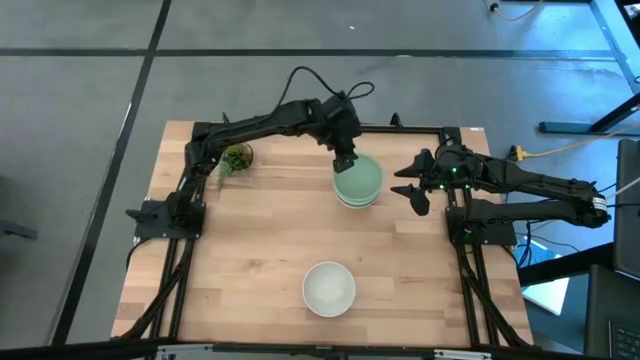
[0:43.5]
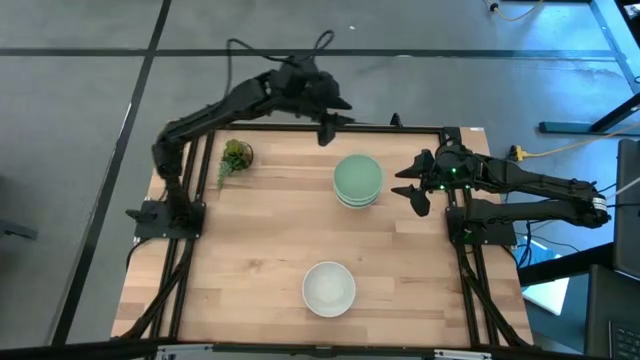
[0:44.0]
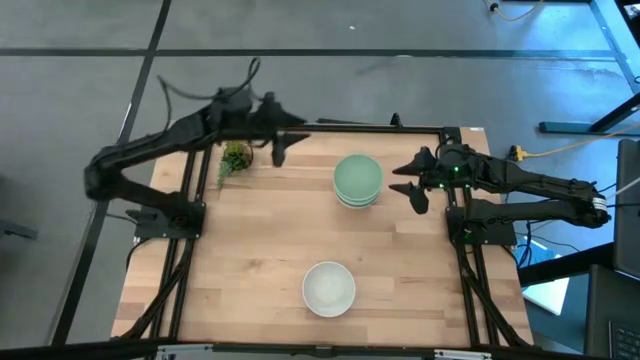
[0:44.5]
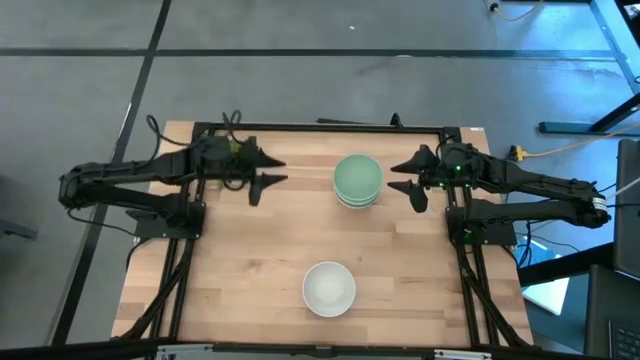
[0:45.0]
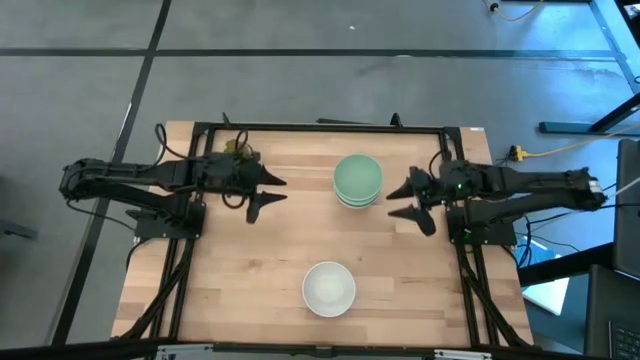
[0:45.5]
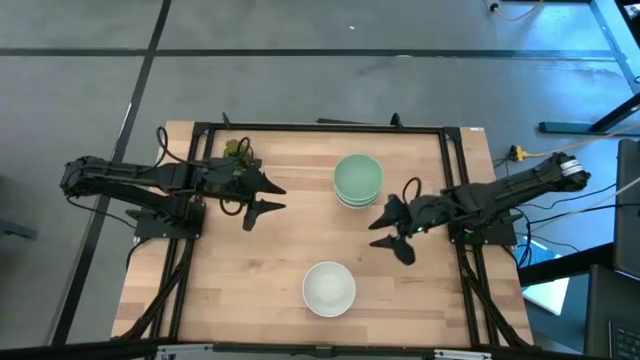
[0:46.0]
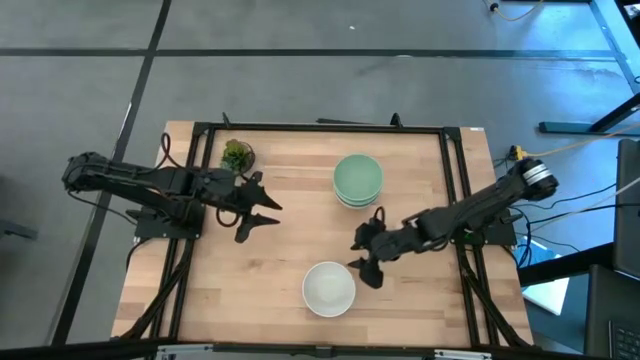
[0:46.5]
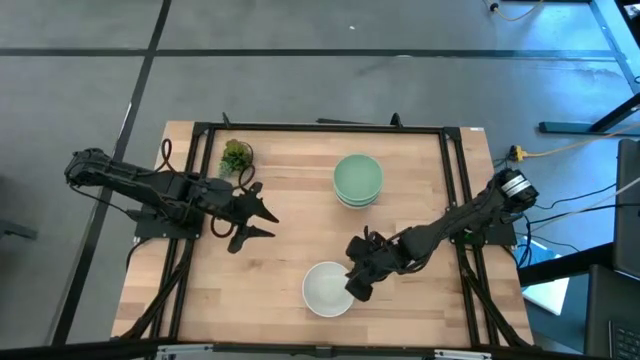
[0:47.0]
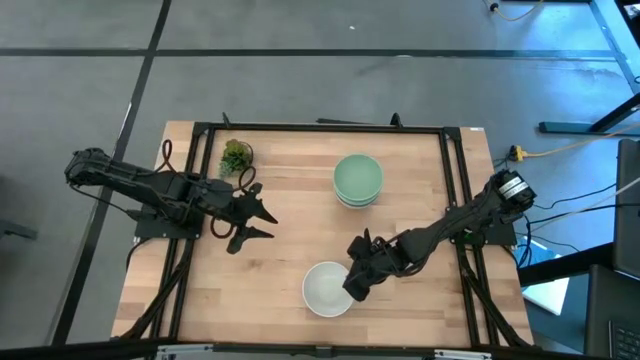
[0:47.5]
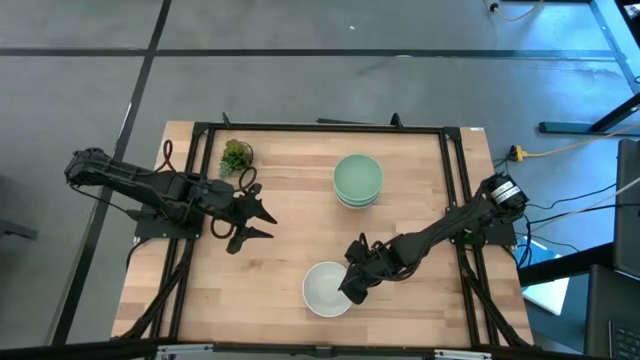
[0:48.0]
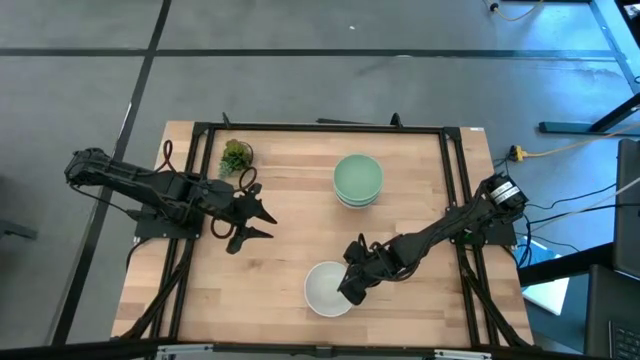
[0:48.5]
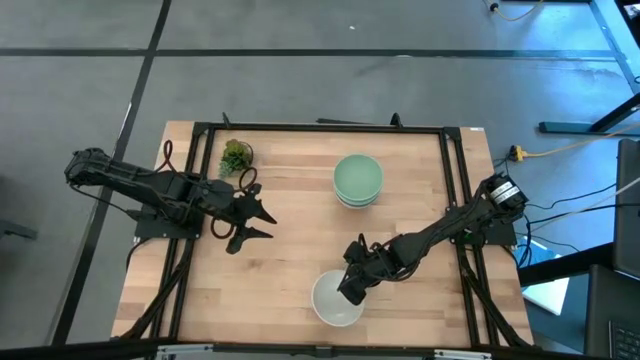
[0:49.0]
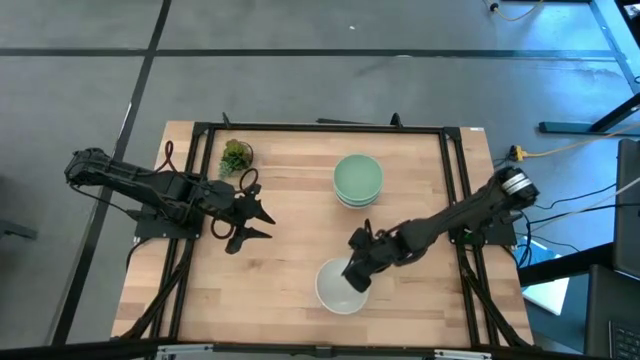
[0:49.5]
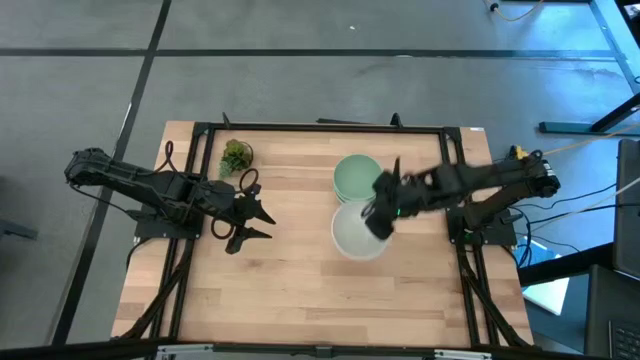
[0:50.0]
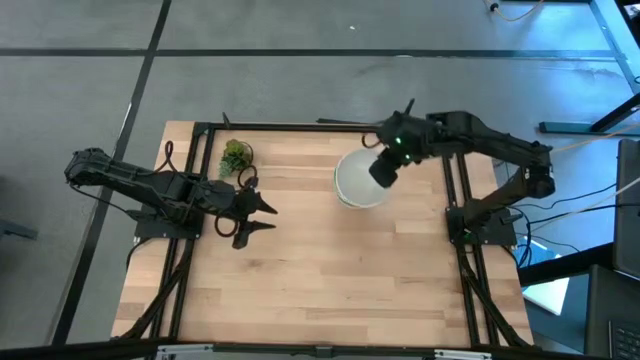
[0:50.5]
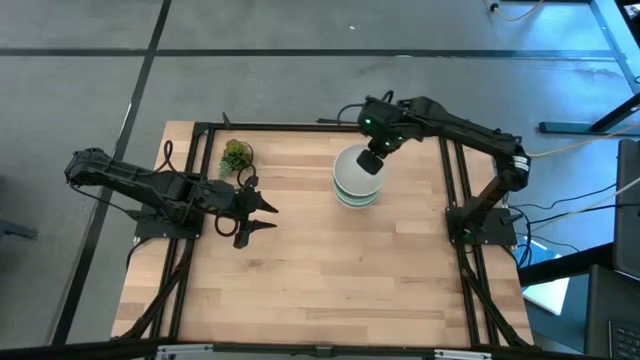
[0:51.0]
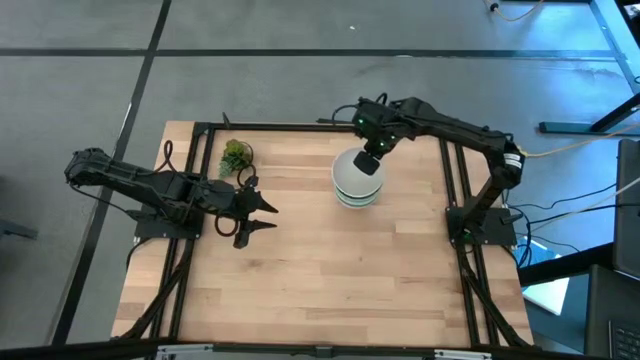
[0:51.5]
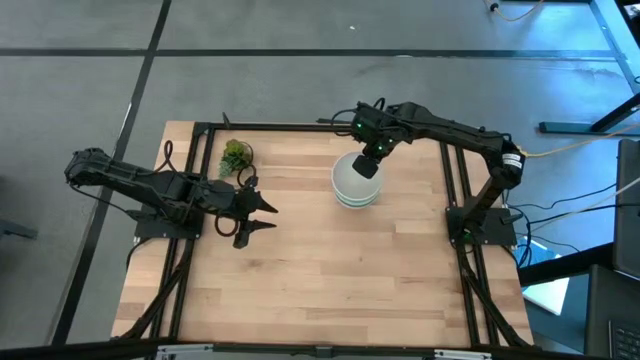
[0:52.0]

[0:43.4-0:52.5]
Task: Nest bowls inside each other
Stack the white bowl on top of the light green bowl

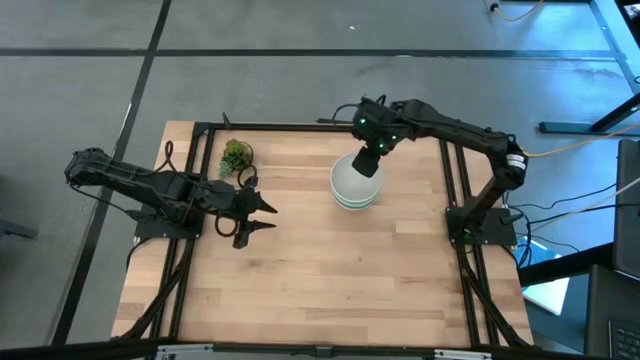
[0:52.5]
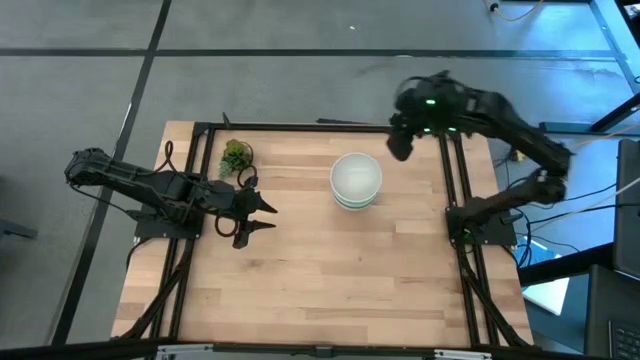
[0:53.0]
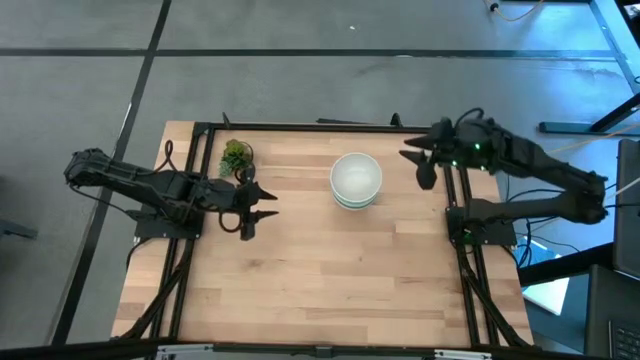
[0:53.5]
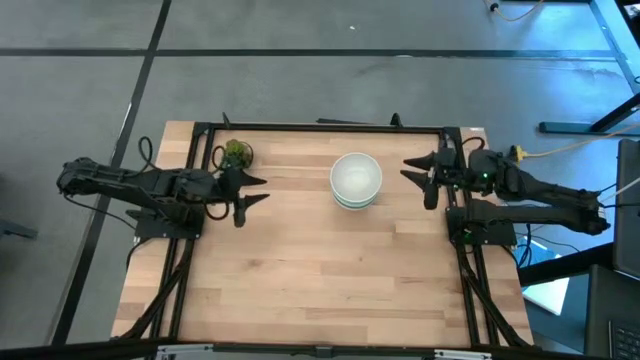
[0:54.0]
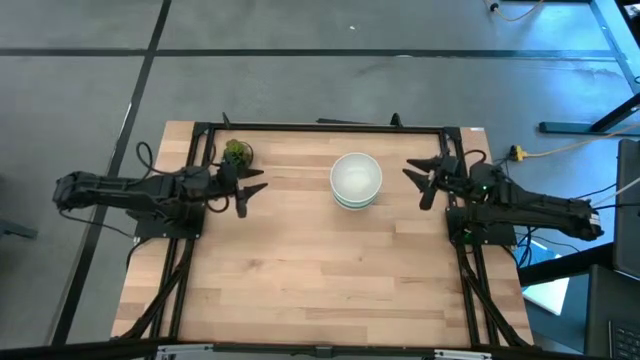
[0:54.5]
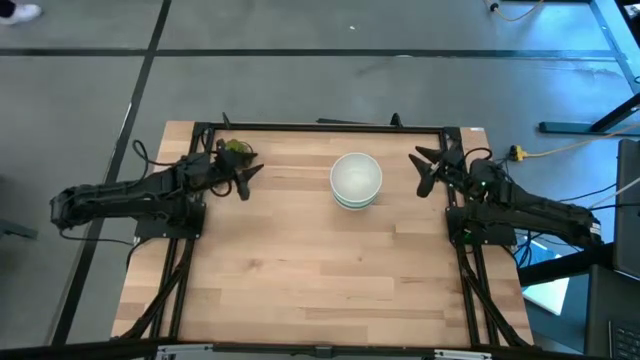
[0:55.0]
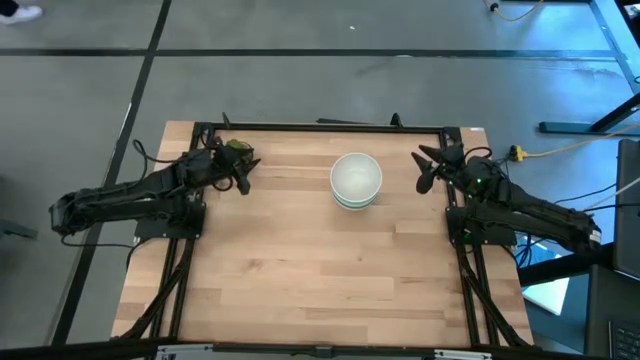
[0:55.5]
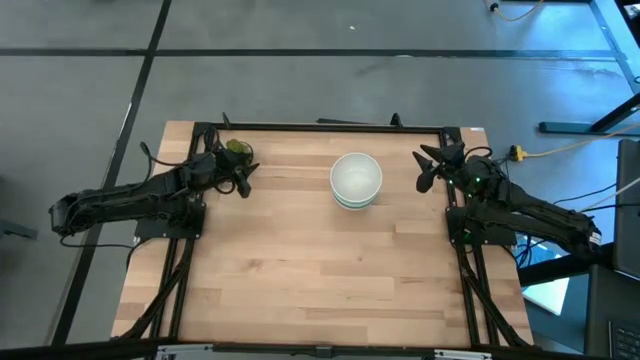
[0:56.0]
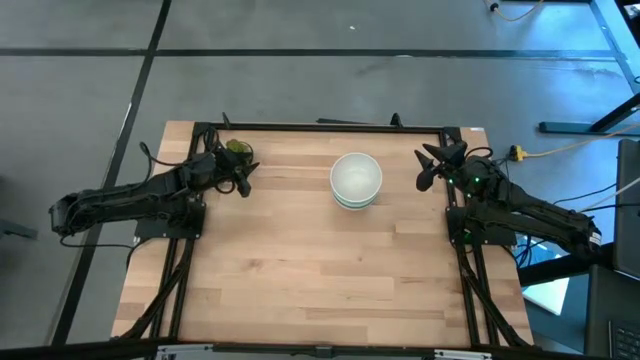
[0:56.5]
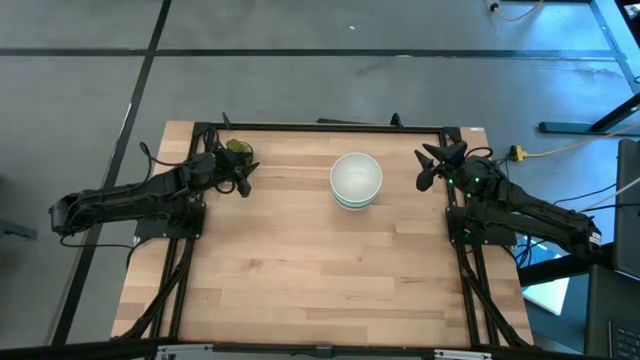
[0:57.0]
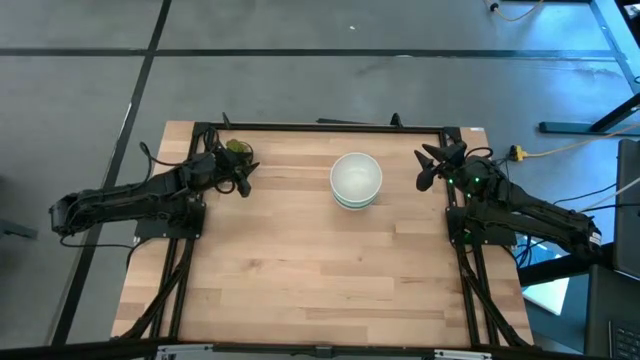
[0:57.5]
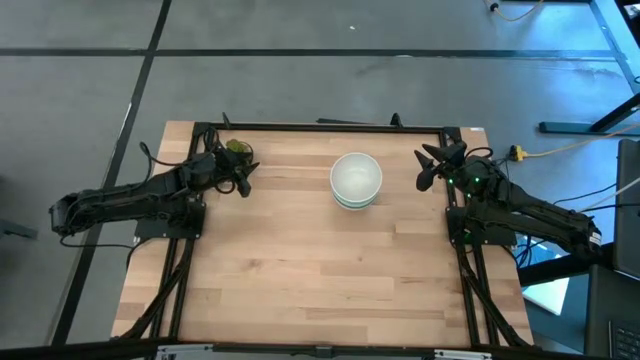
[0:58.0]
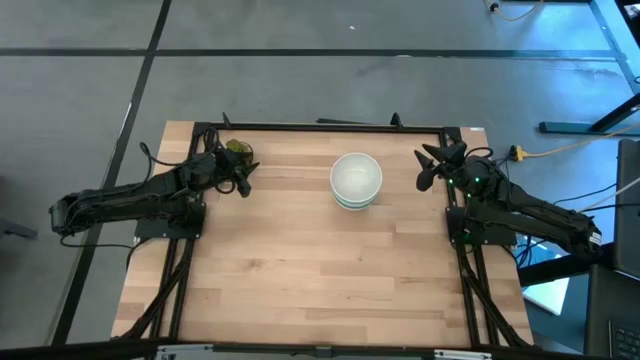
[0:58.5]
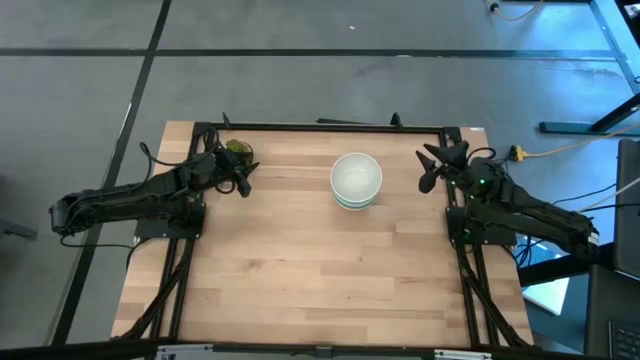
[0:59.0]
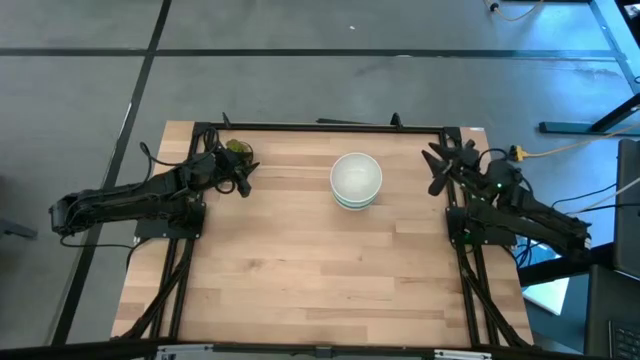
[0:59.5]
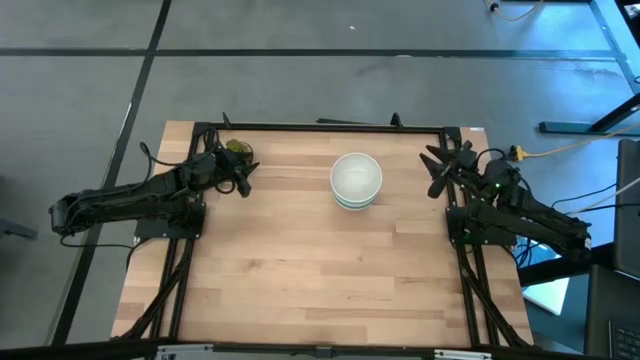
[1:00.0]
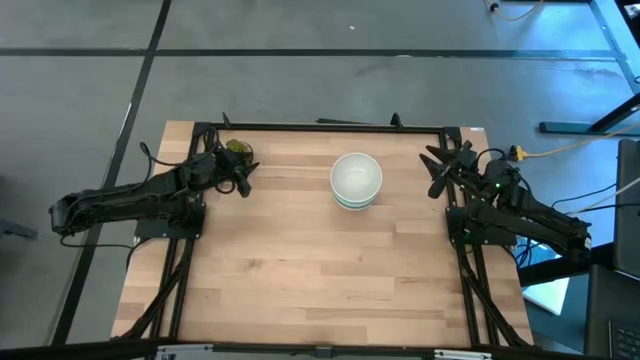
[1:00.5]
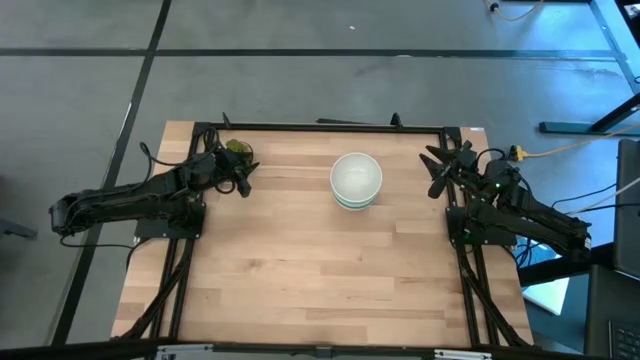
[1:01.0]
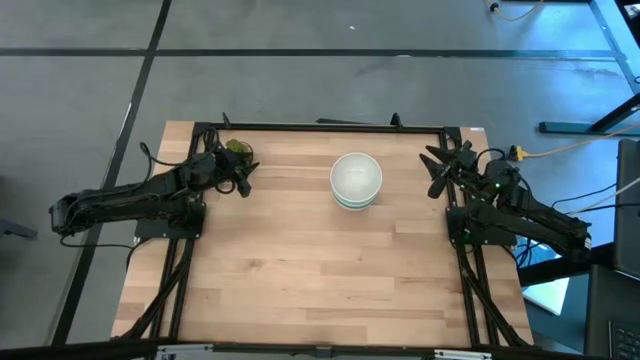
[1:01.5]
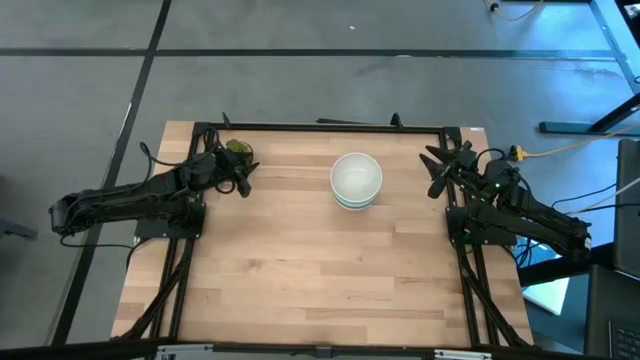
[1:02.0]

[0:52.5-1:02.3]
Return to Home Position

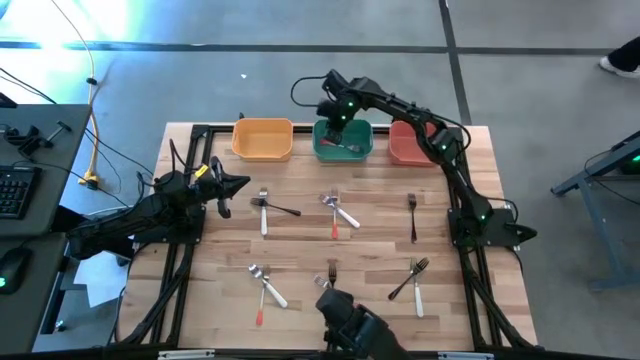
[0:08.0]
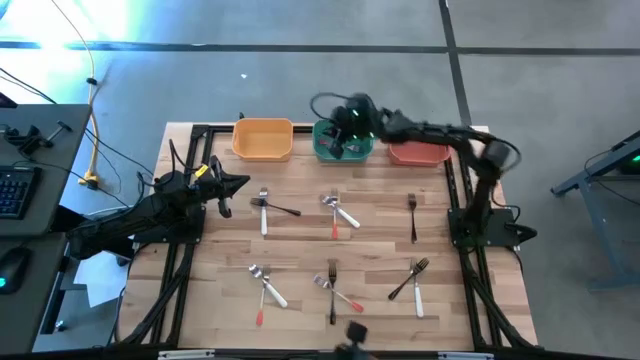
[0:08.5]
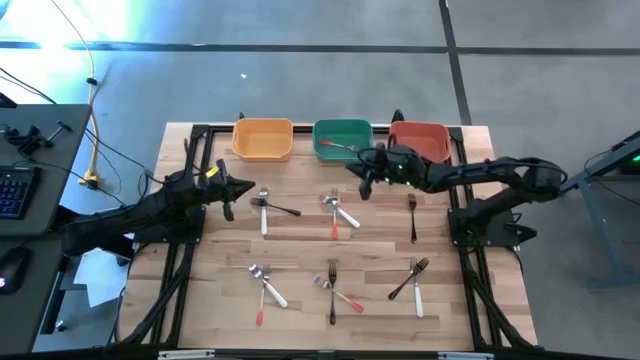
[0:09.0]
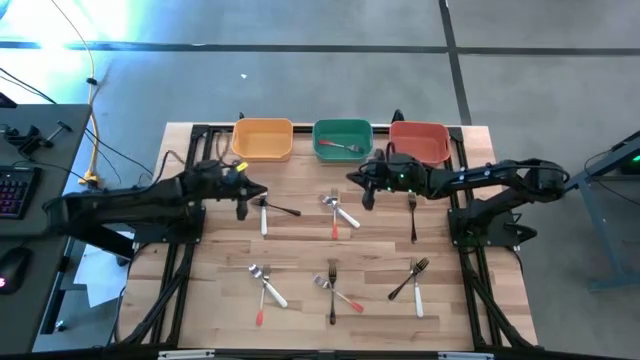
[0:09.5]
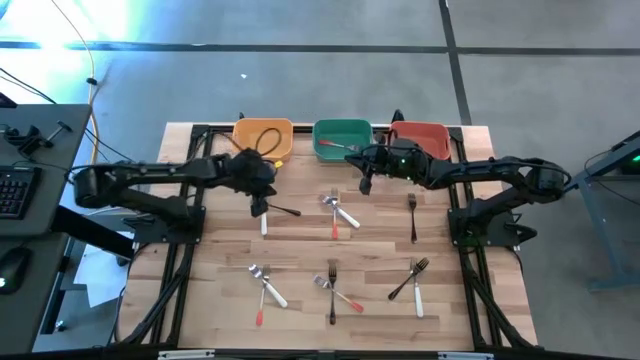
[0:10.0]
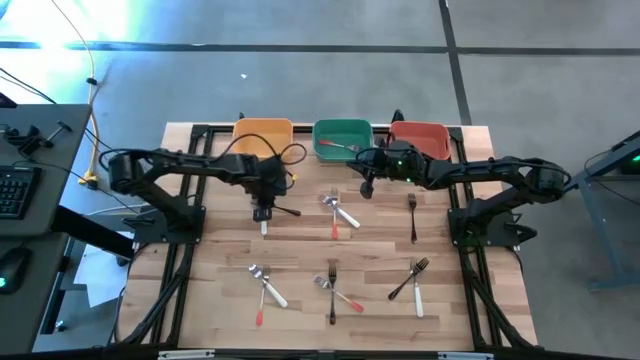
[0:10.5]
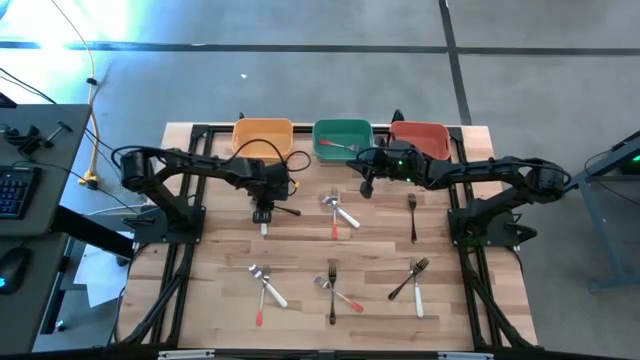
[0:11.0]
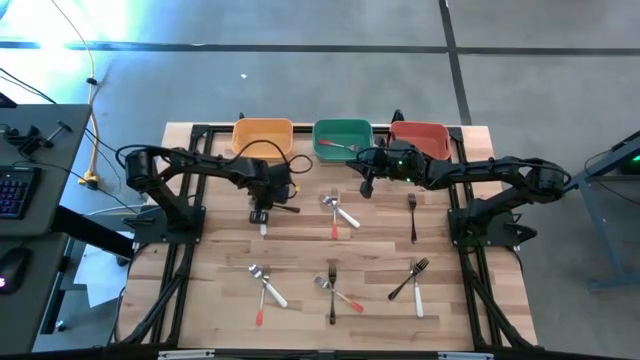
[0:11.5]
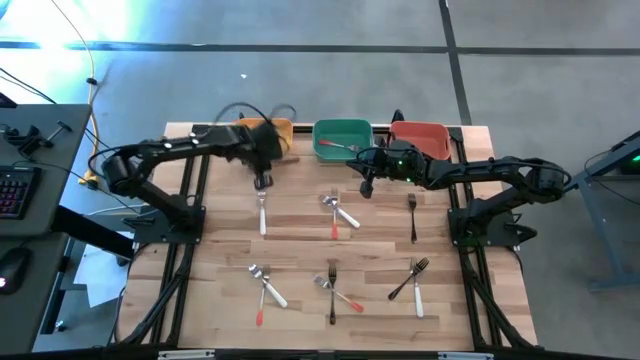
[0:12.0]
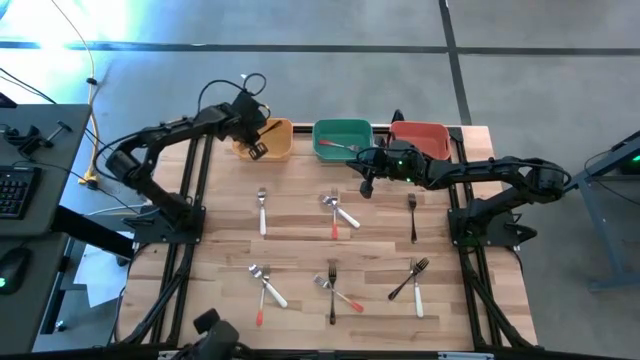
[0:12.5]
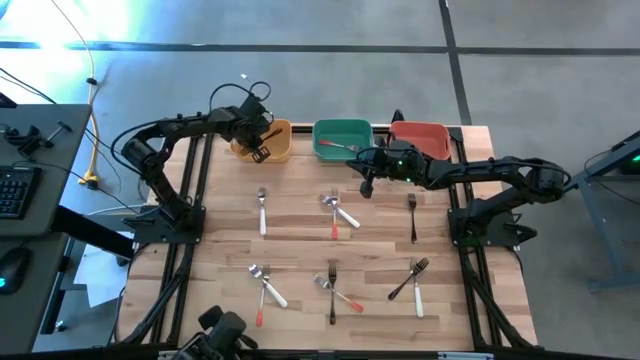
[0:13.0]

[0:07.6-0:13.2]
Task: Sort silverware by color (type)
Put the top left black fork into the yellow bin
